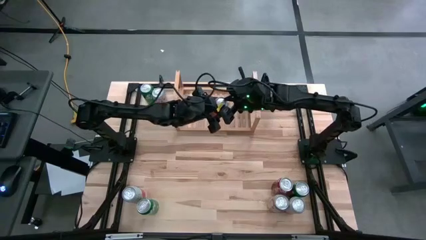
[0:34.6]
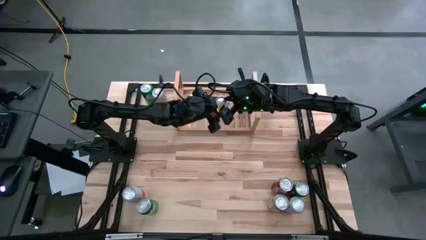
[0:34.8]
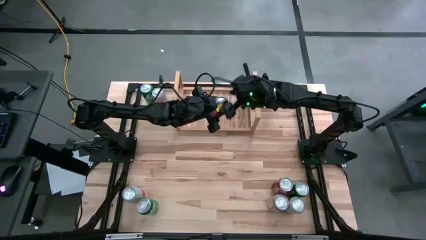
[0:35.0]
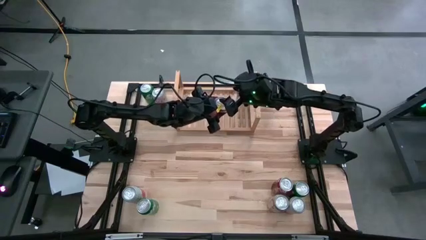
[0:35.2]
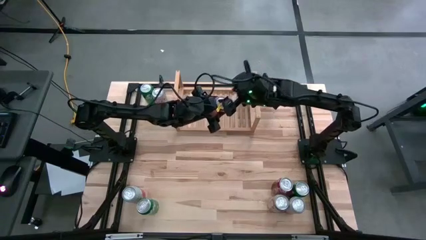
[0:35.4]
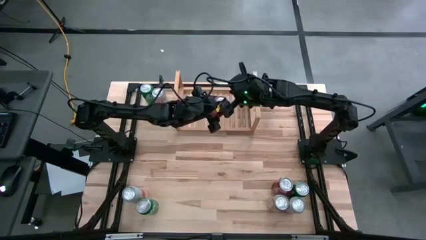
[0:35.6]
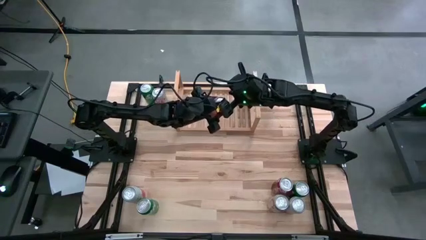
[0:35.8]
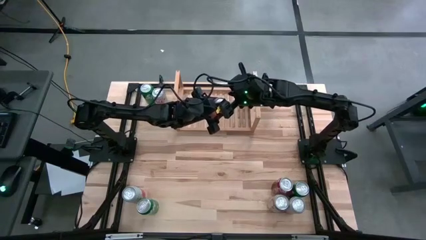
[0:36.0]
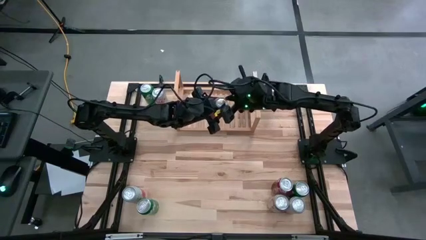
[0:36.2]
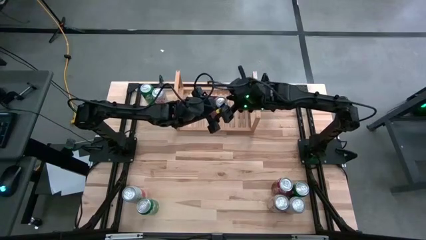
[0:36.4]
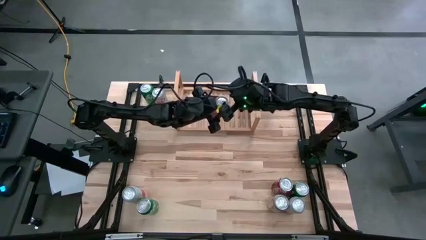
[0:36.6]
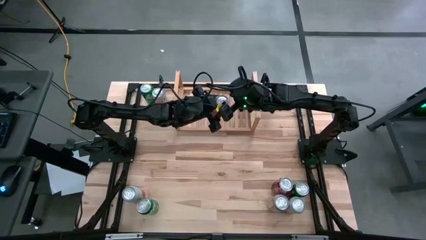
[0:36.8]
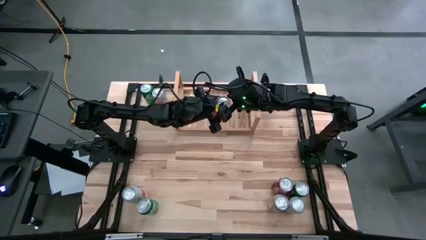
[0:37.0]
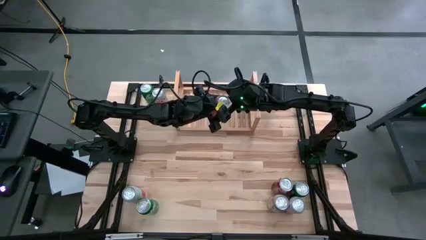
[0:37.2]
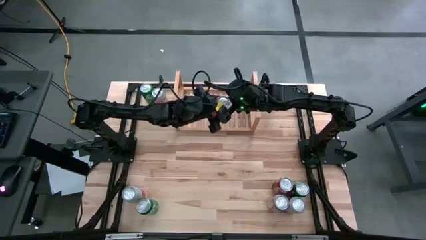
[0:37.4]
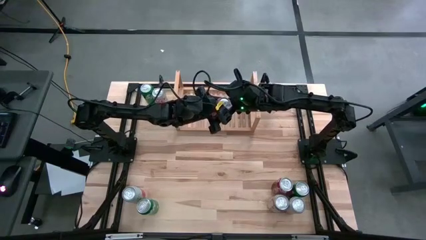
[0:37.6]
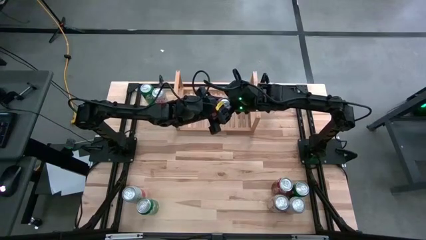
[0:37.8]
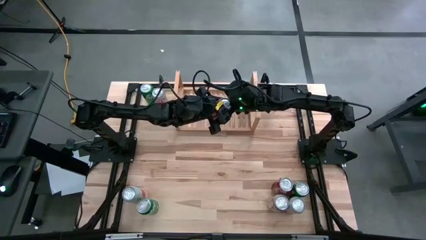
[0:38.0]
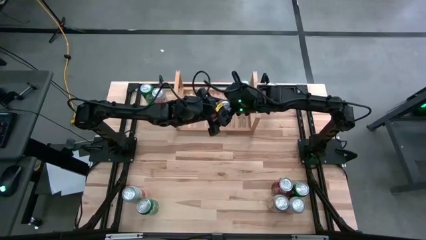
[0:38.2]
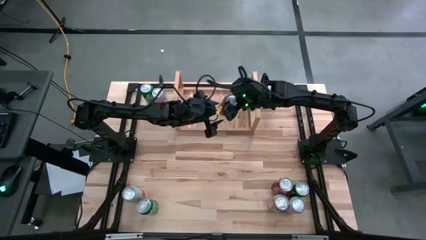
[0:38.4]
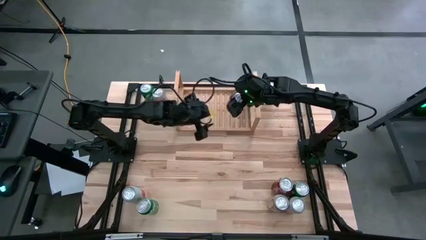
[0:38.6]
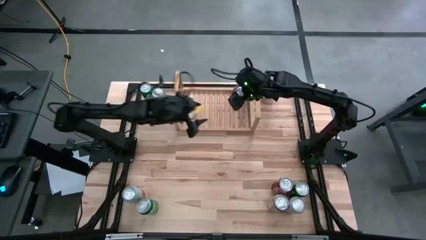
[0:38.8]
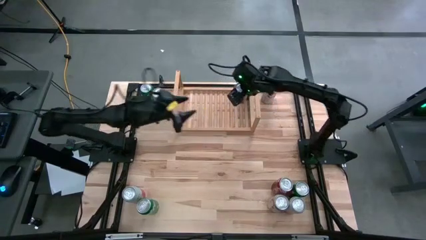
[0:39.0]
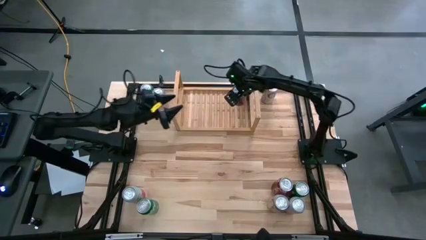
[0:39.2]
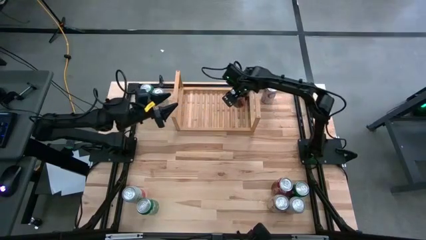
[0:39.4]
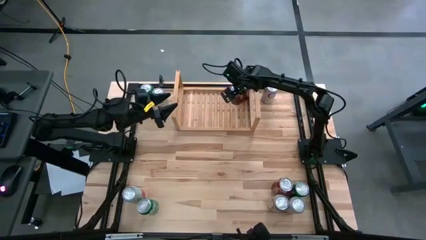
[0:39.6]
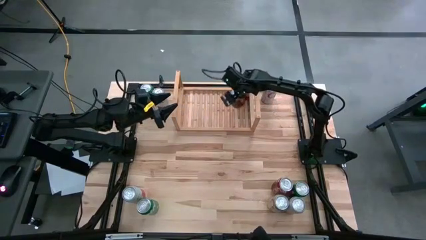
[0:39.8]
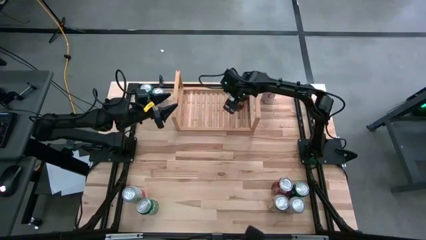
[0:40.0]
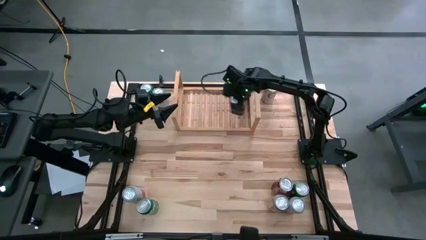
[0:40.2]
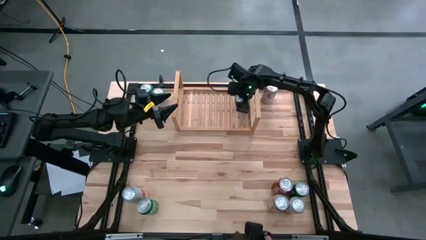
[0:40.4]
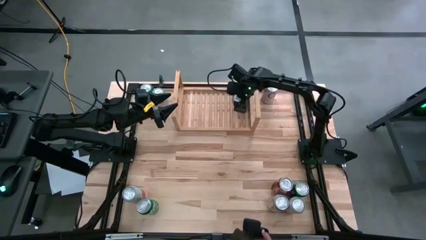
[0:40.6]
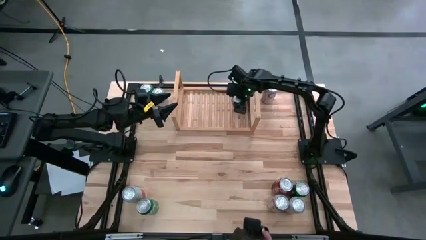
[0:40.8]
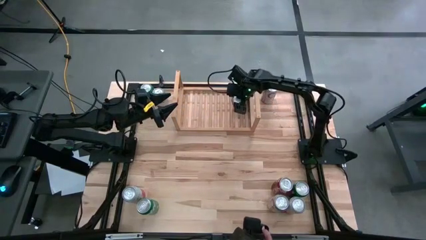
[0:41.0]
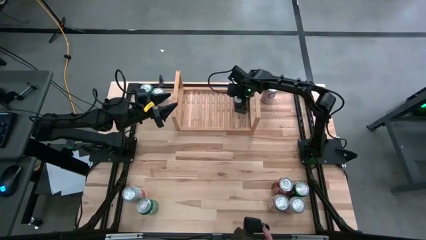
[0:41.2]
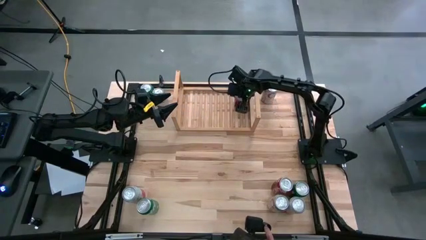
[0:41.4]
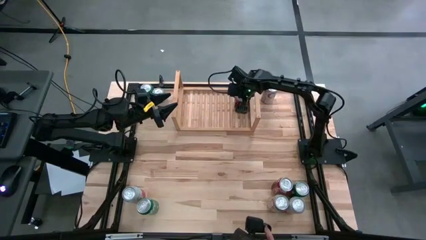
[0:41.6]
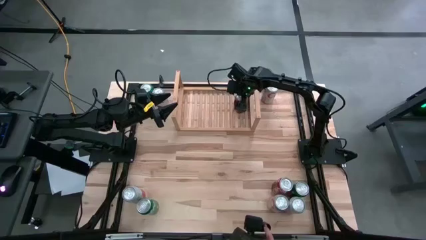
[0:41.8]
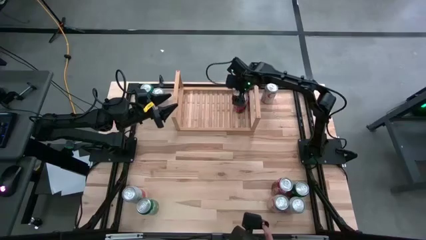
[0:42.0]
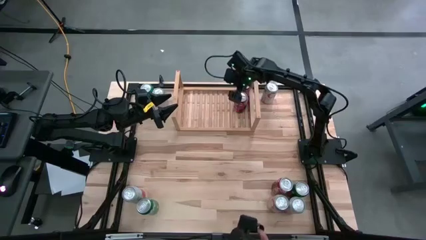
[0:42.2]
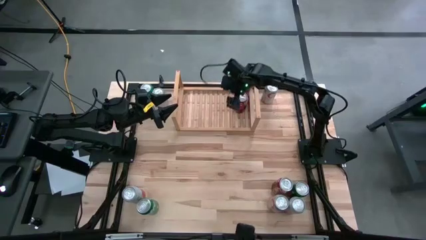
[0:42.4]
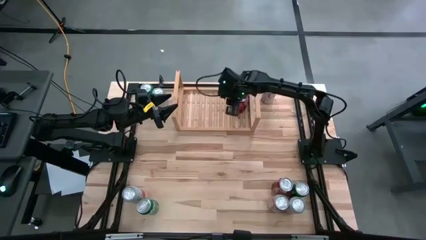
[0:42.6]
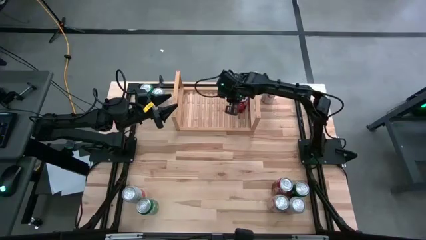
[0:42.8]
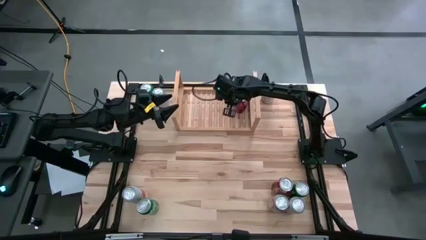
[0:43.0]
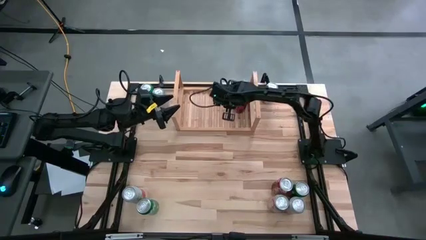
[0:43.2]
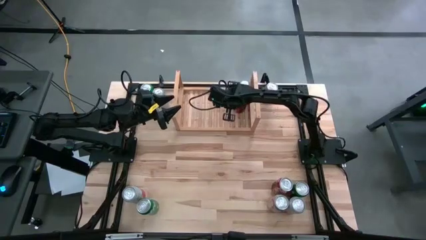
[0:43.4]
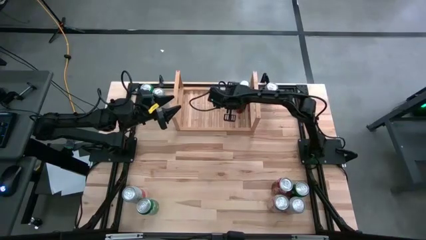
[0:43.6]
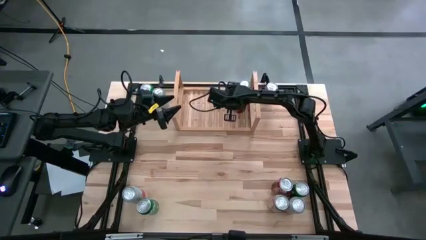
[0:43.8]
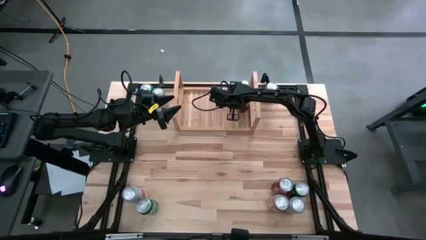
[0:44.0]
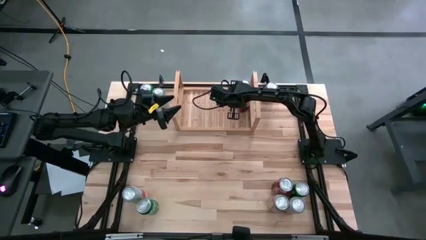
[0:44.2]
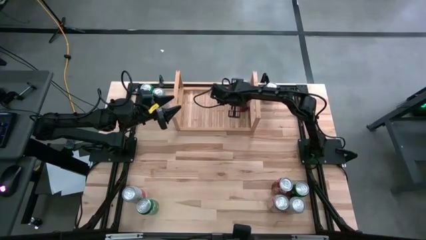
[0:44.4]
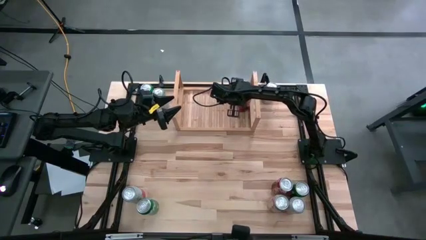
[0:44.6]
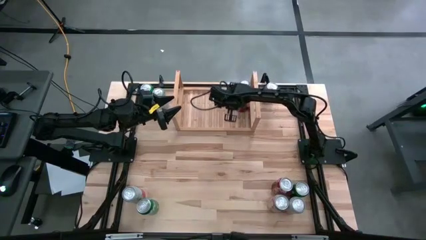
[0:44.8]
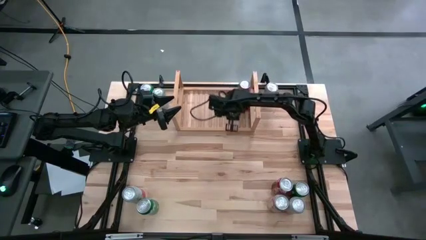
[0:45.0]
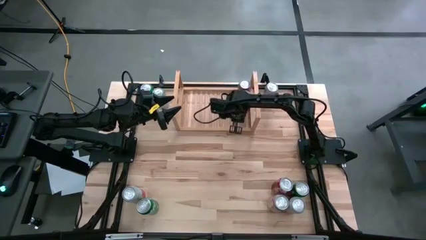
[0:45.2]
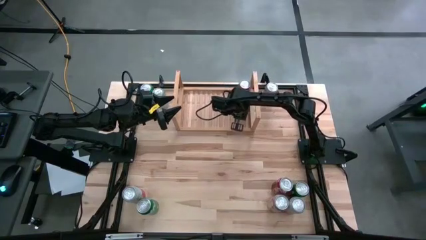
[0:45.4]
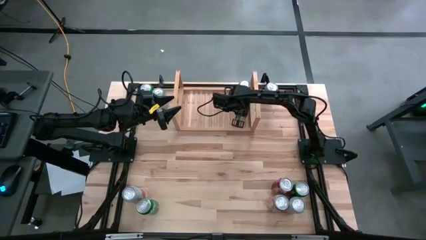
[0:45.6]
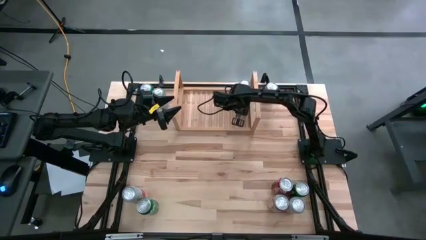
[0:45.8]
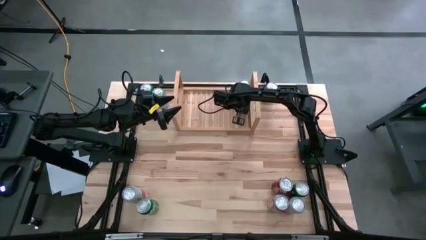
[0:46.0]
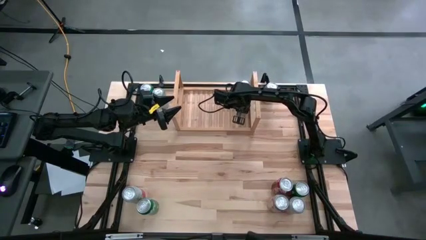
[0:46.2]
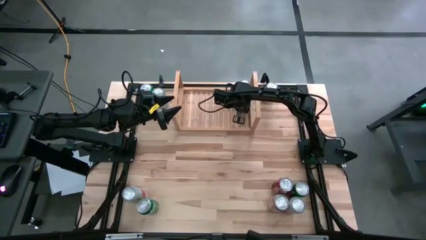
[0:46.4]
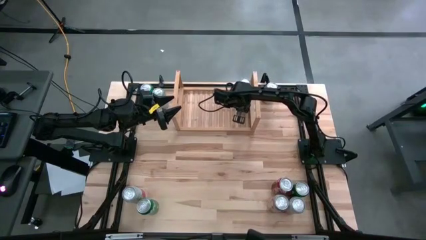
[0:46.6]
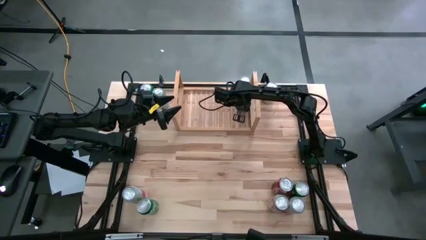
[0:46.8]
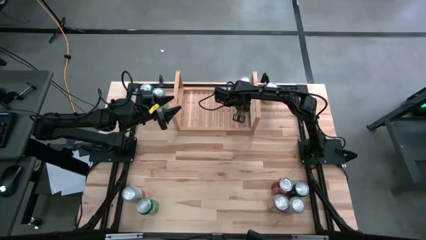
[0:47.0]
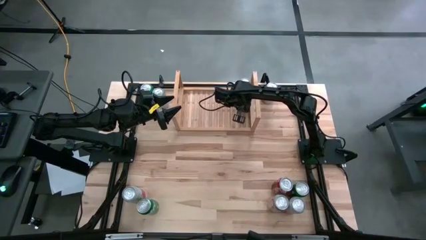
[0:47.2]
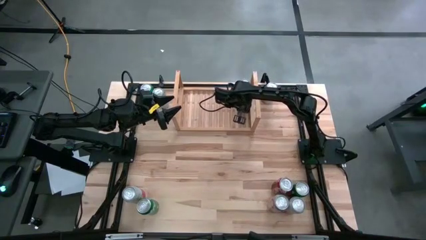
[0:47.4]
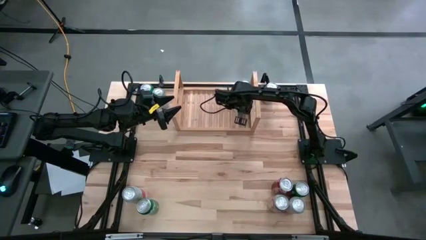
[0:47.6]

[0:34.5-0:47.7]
Task: Place canned beverage on shelf
Put the left red soda can aligned with the other red soda can on the shelf
